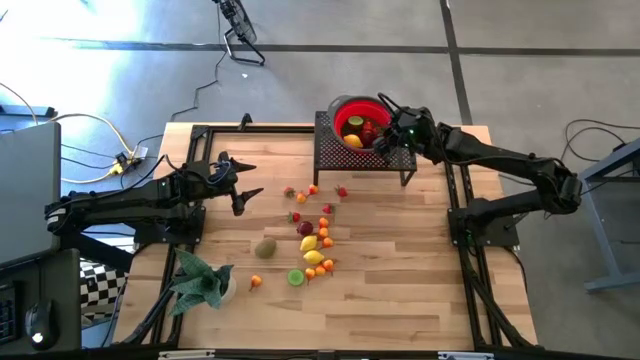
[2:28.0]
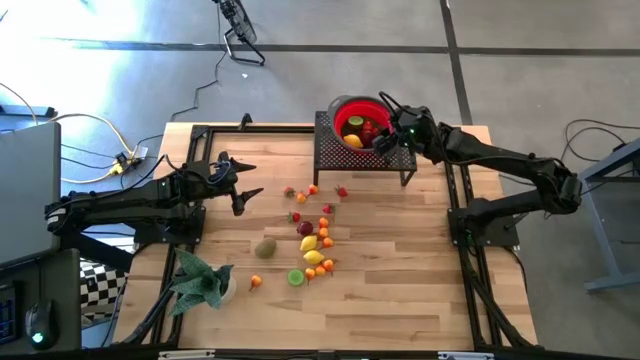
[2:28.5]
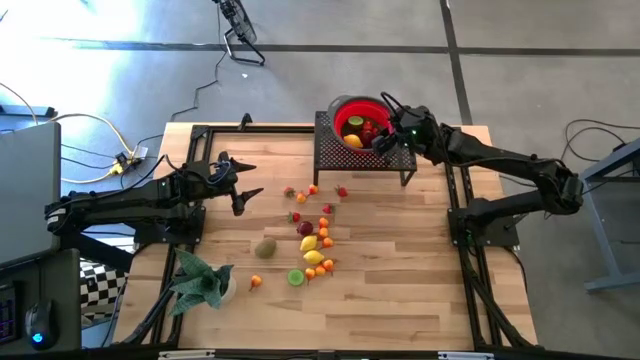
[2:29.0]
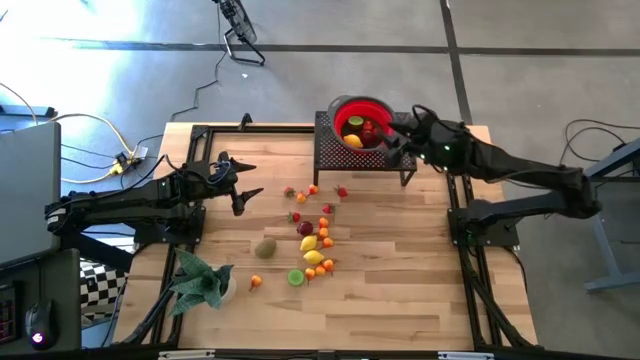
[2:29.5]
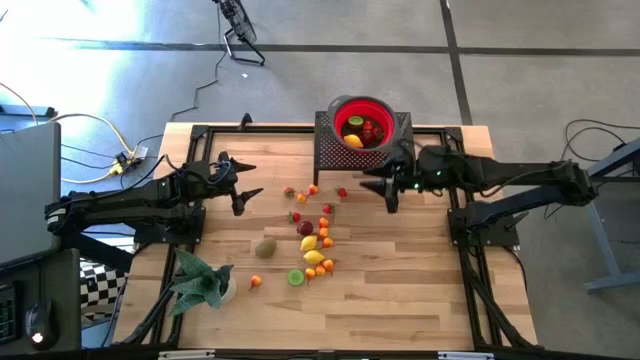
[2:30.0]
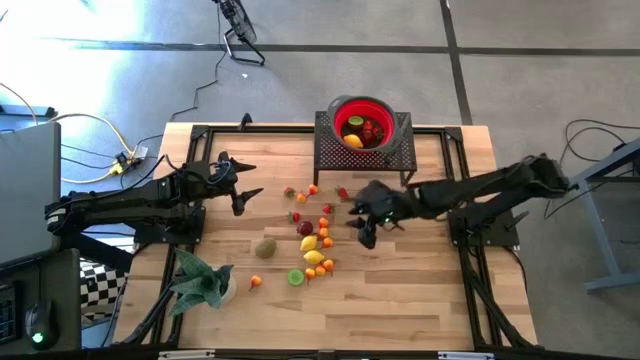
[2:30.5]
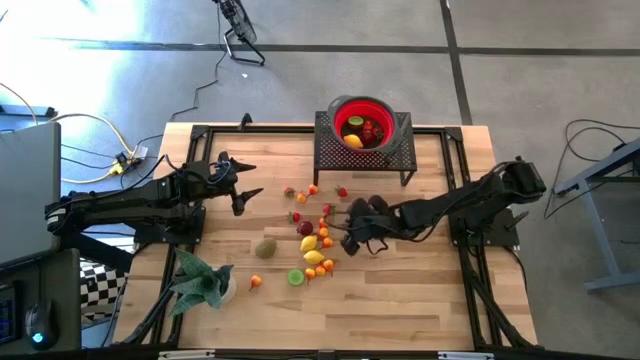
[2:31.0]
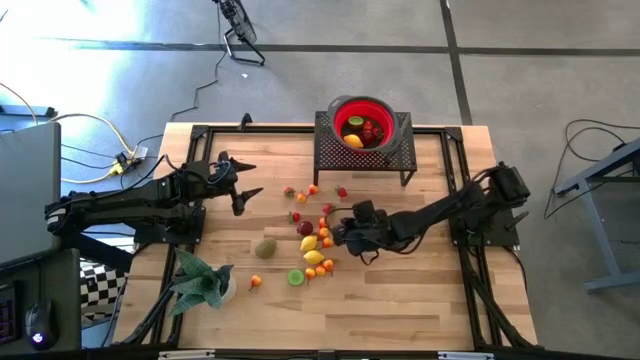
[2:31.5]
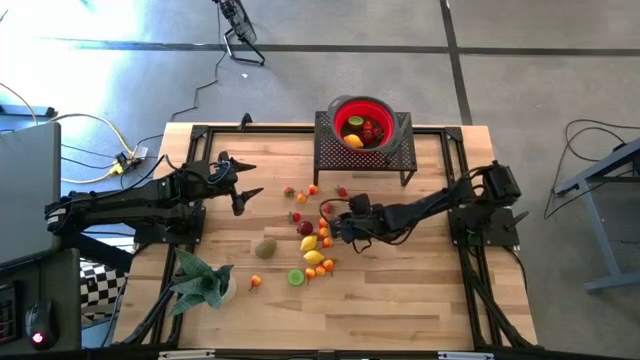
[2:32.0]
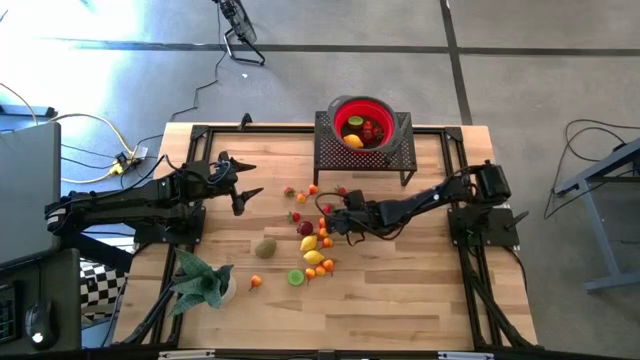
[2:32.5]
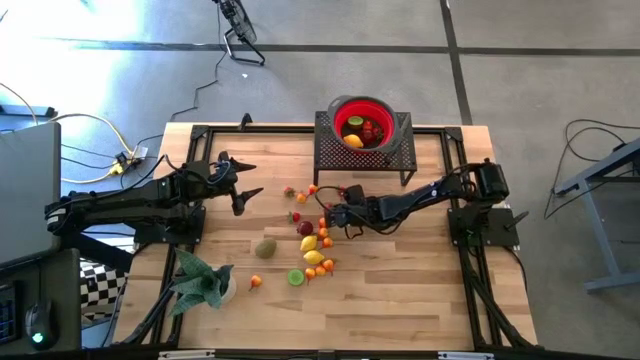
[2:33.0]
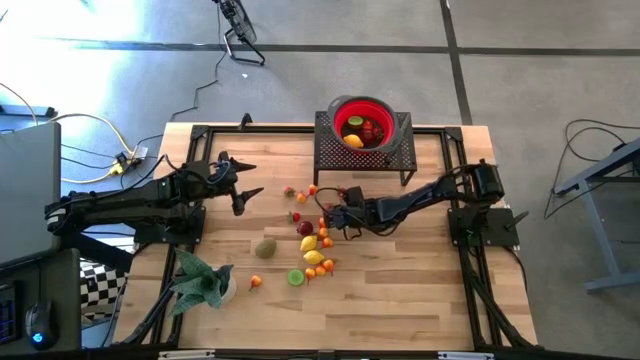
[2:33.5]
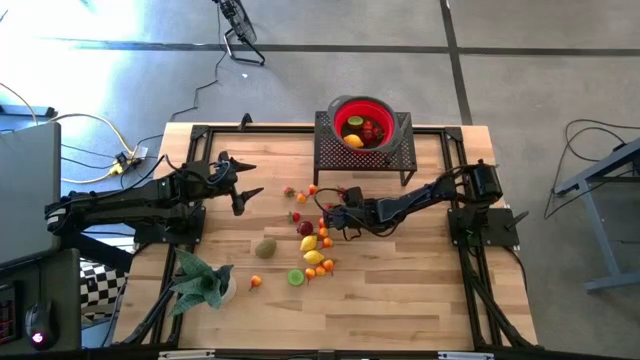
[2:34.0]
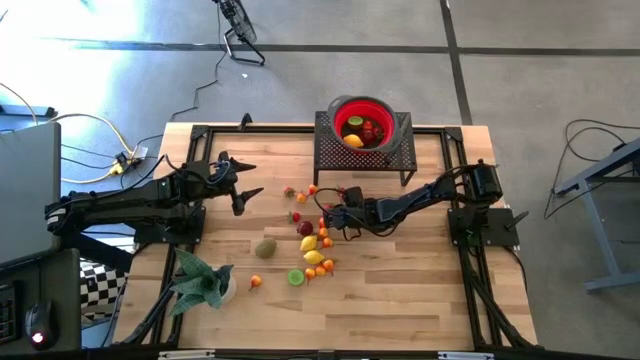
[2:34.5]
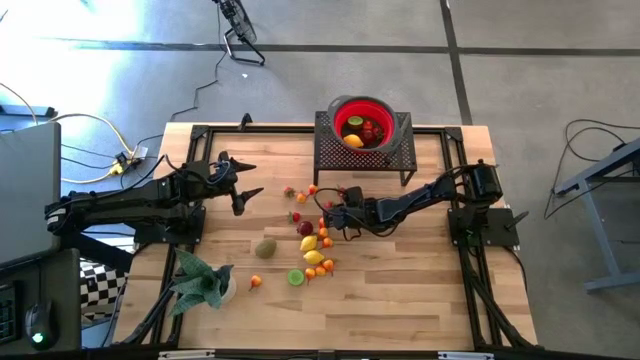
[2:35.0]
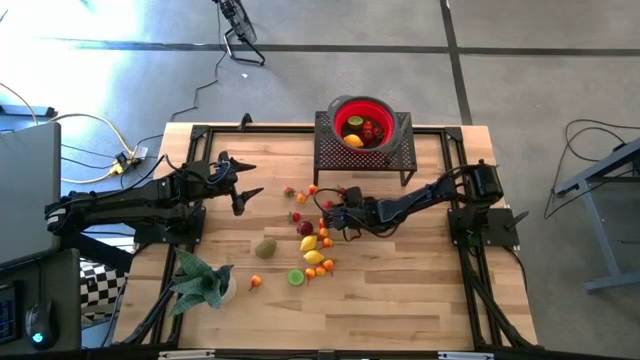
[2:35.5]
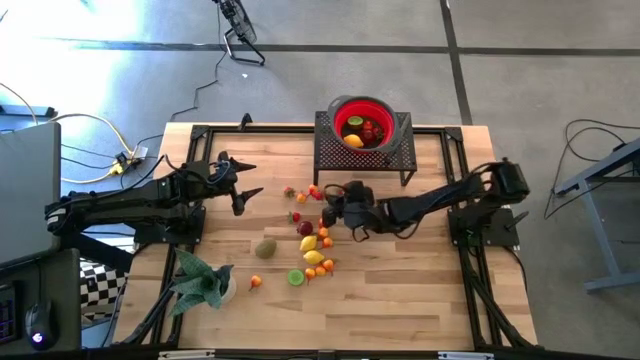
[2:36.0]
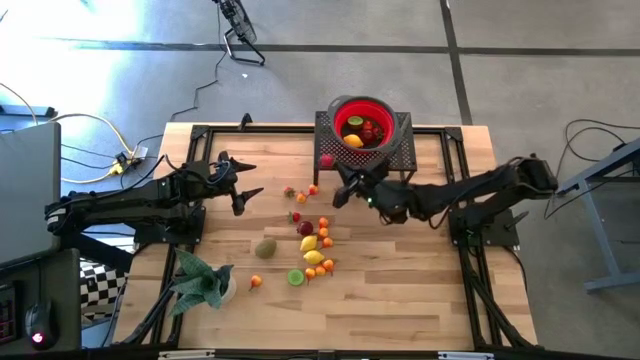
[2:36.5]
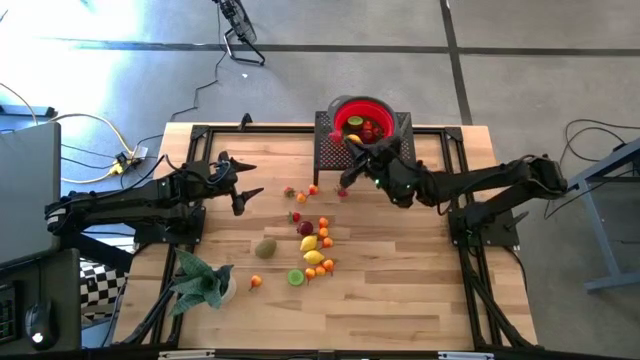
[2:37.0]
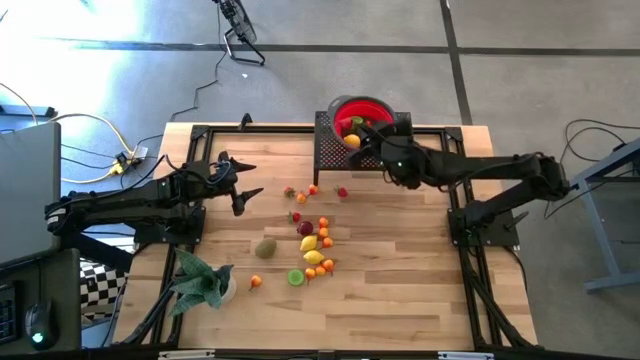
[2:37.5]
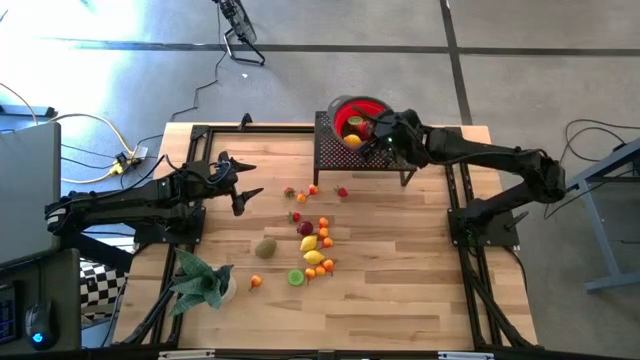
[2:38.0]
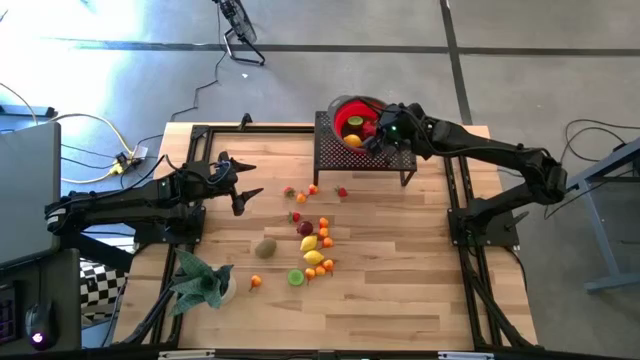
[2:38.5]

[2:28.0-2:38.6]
Task: Pick & Place Fruit
Put the strawberry into the strainer on the shelf

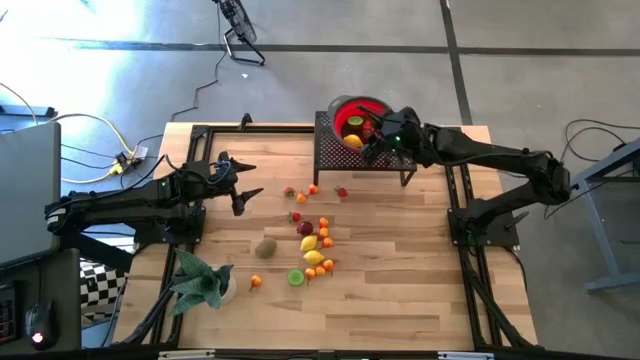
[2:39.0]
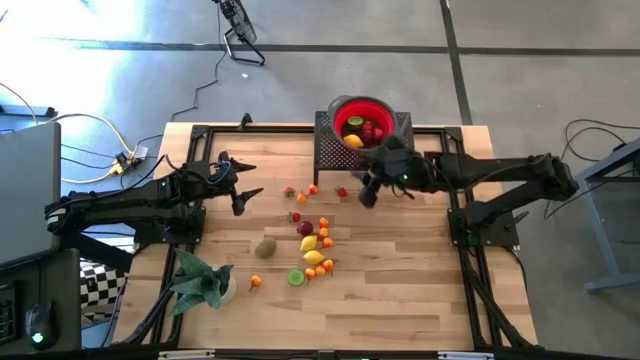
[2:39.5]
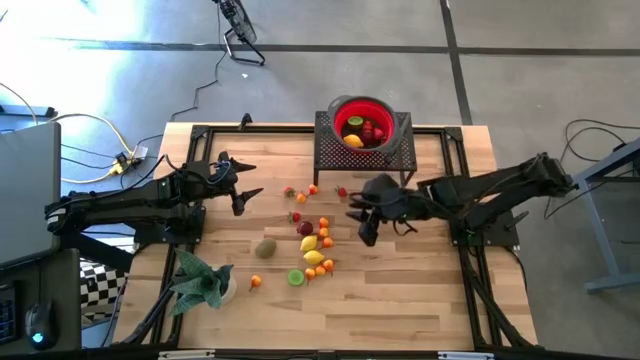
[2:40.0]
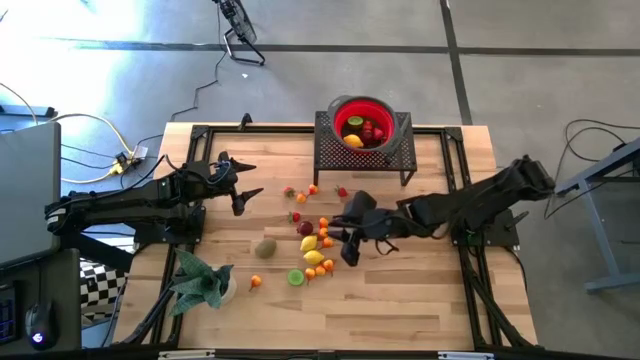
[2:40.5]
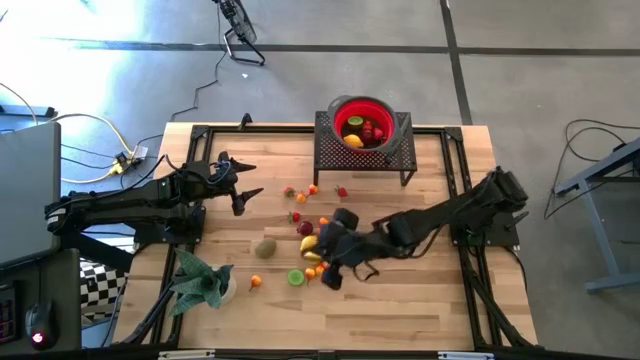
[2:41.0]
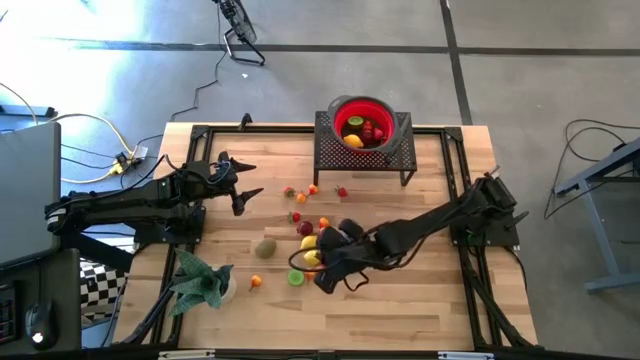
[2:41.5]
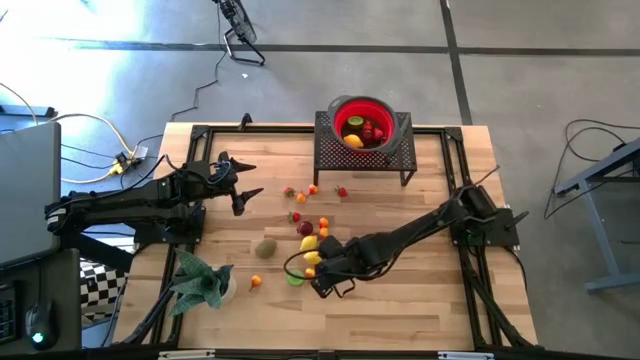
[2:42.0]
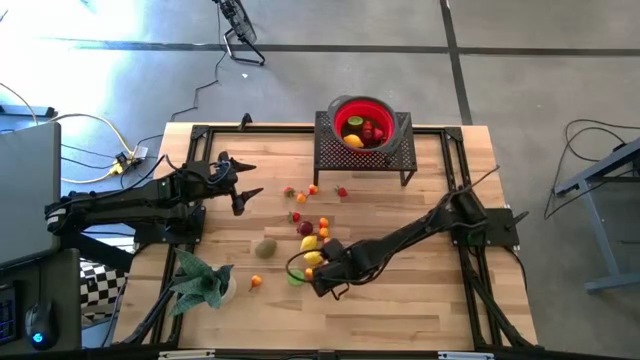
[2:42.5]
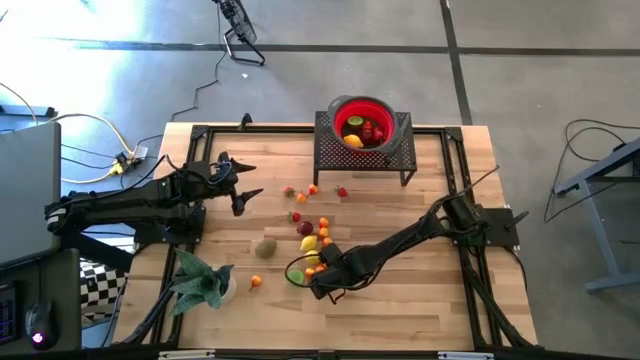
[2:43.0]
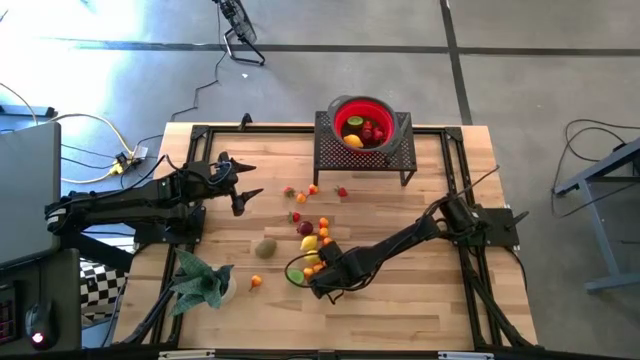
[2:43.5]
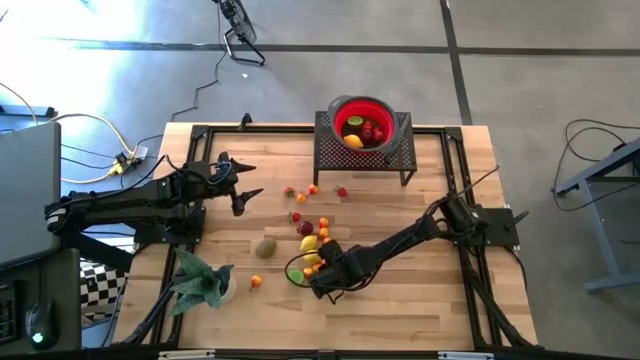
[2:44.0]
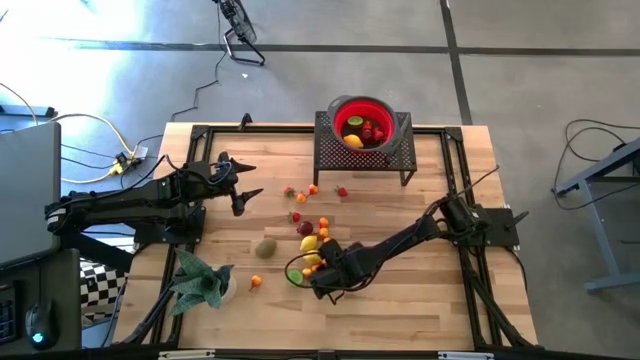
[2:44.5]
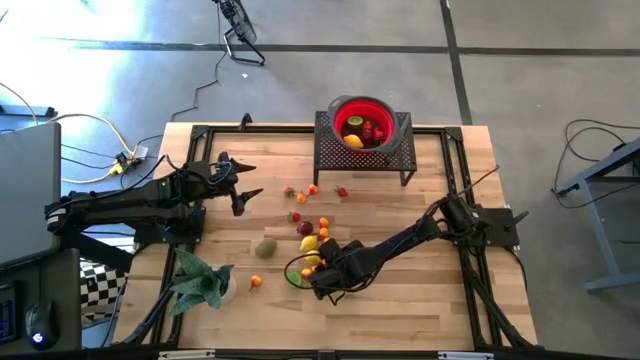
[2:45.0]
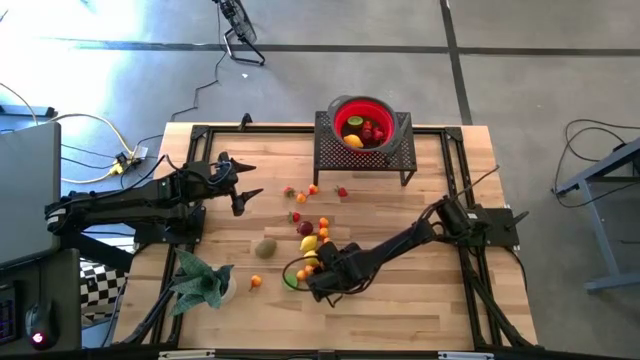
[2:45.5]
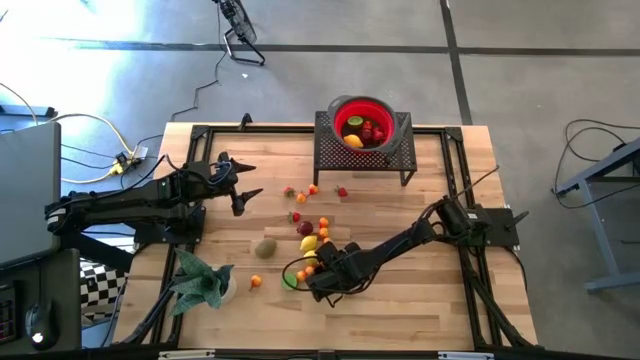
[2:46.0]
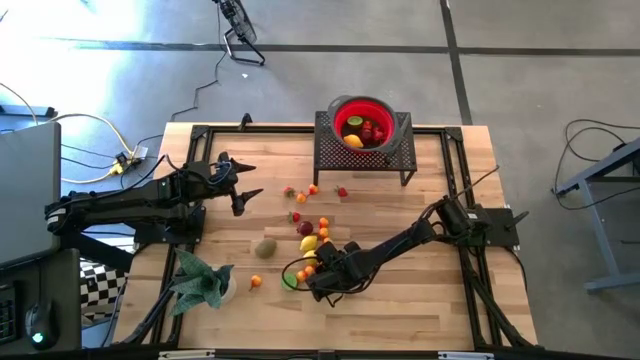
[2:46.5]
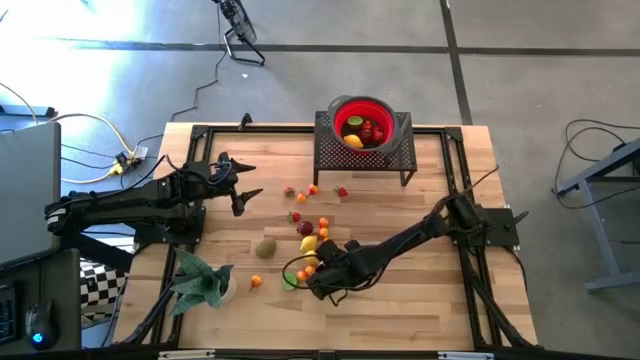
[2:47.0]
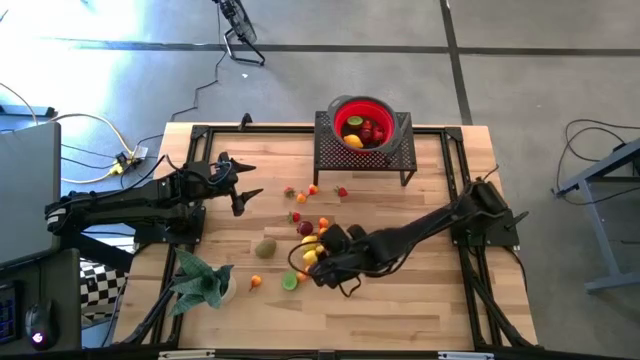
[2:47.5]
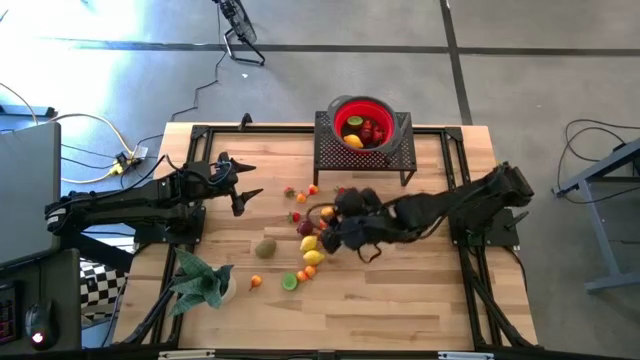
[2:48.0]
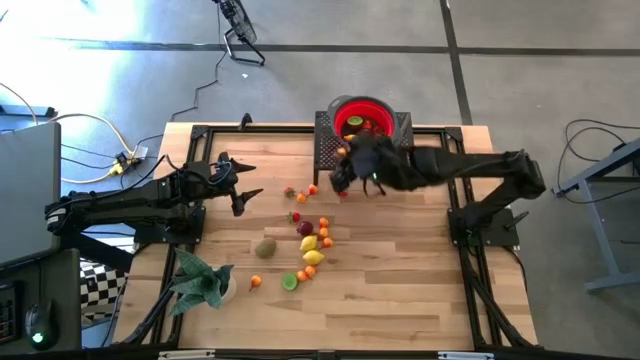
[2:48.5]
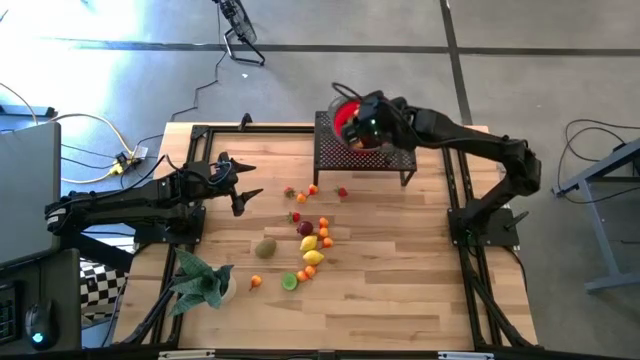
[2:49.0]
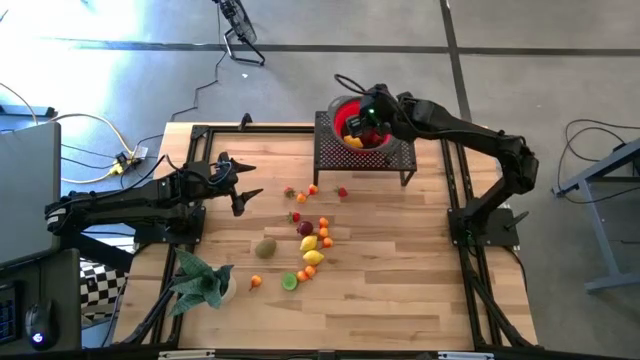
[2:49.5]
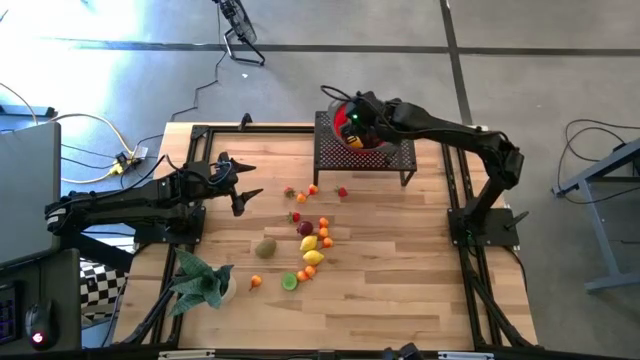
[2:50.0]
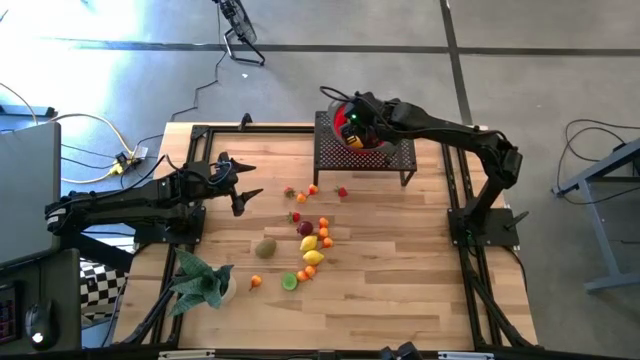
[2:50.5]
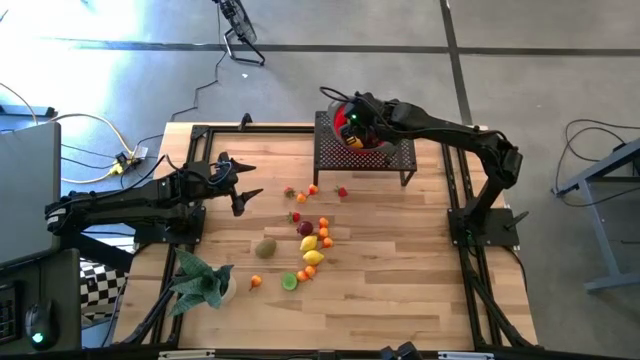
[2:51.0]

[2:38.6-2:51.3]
Put the pear into the strainer on the shelf
